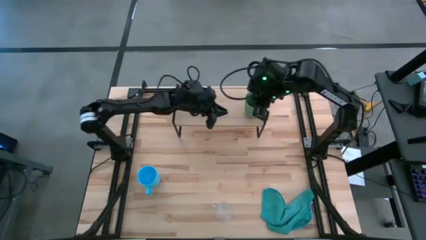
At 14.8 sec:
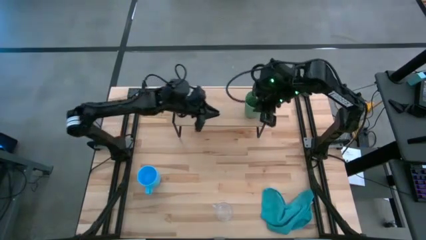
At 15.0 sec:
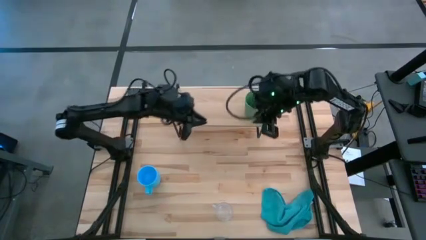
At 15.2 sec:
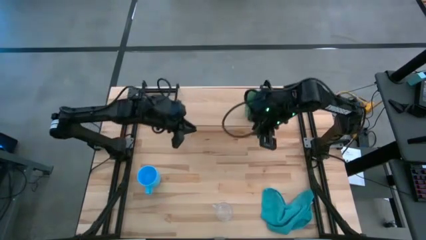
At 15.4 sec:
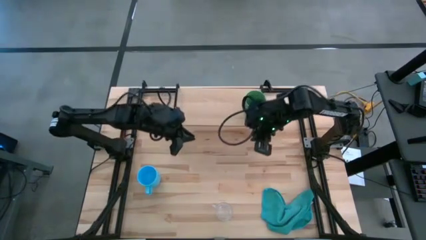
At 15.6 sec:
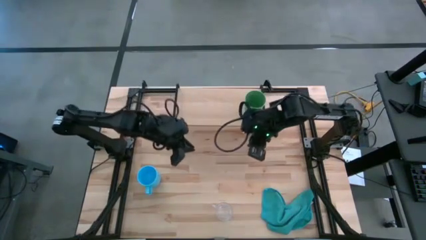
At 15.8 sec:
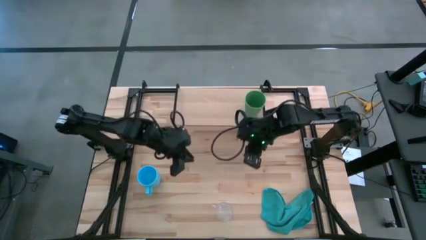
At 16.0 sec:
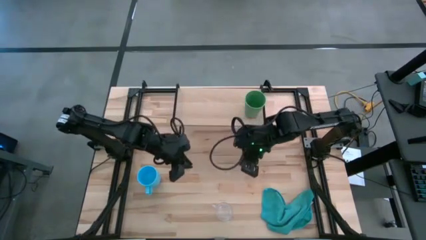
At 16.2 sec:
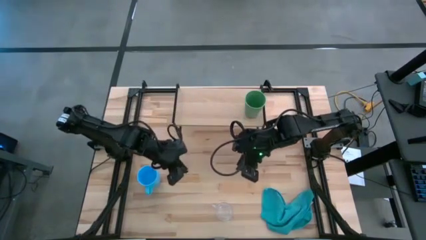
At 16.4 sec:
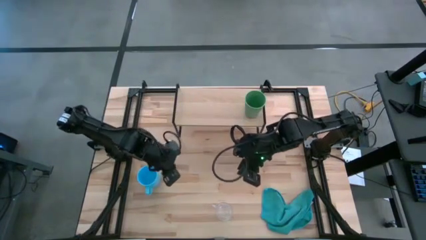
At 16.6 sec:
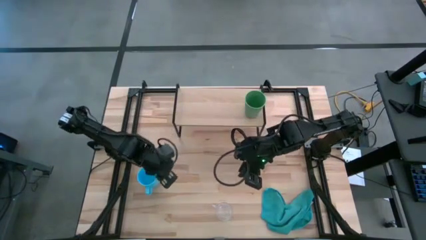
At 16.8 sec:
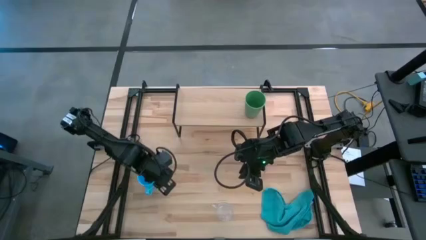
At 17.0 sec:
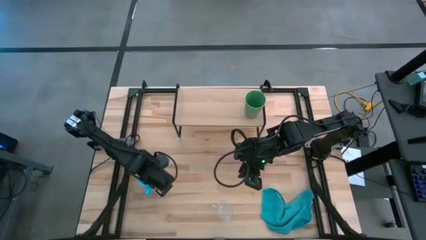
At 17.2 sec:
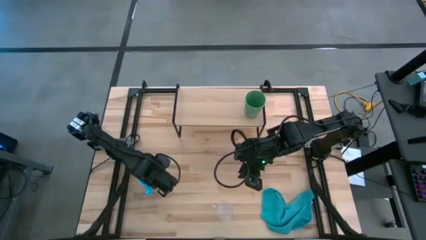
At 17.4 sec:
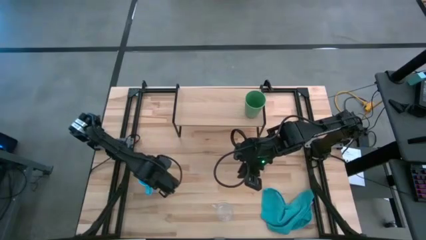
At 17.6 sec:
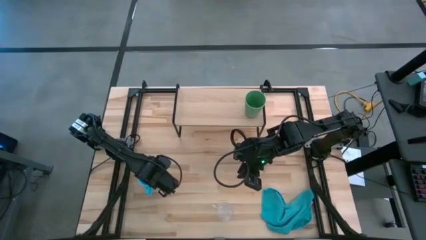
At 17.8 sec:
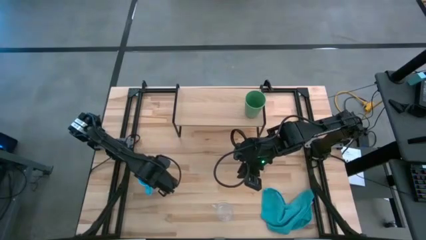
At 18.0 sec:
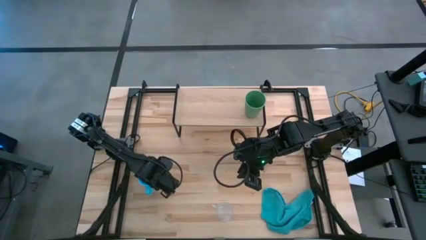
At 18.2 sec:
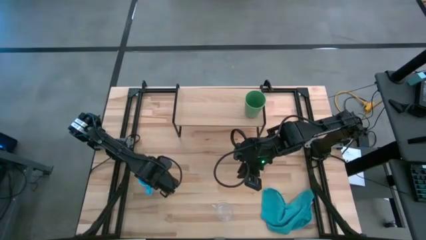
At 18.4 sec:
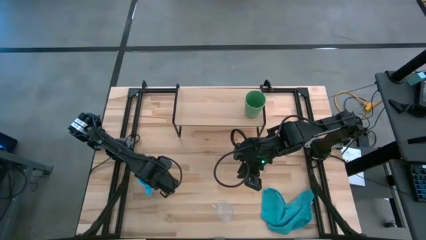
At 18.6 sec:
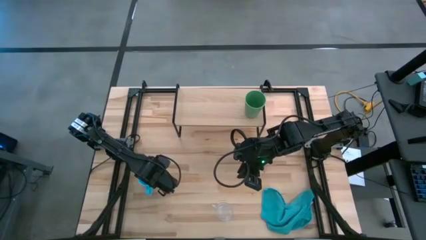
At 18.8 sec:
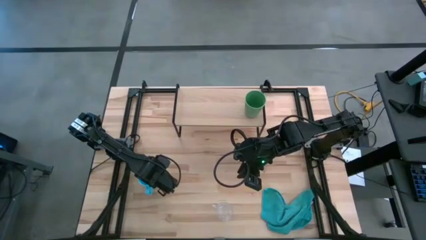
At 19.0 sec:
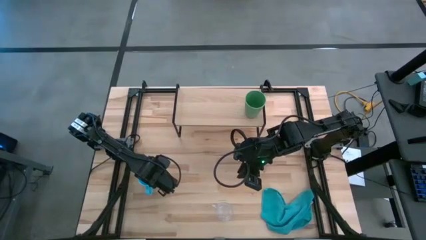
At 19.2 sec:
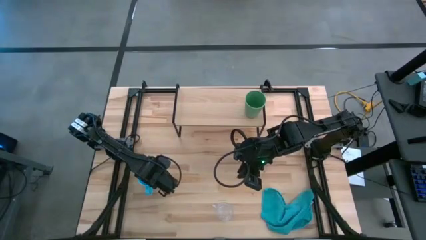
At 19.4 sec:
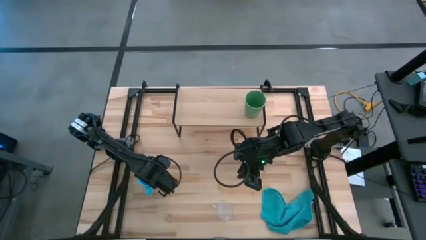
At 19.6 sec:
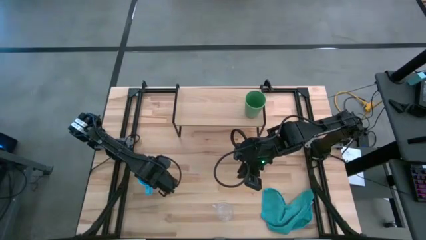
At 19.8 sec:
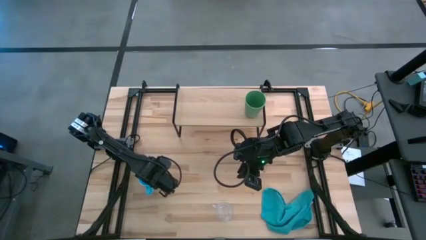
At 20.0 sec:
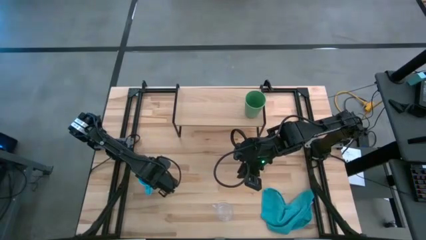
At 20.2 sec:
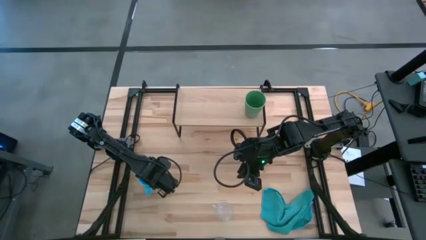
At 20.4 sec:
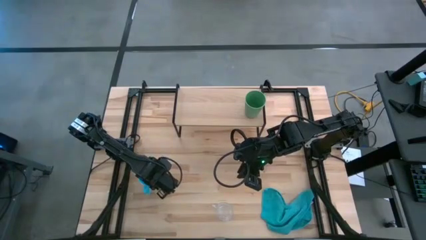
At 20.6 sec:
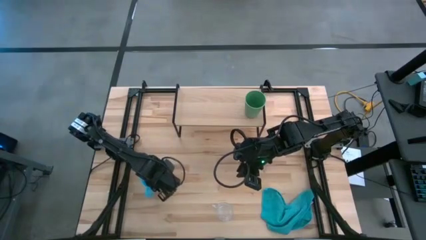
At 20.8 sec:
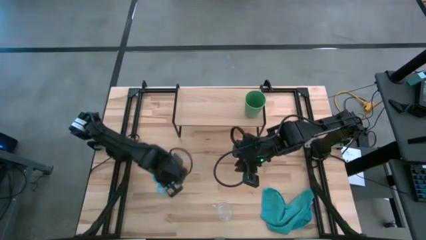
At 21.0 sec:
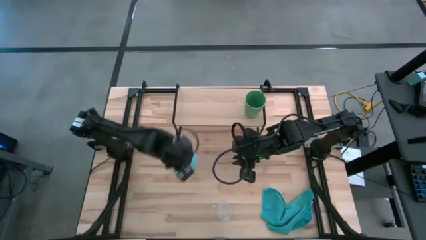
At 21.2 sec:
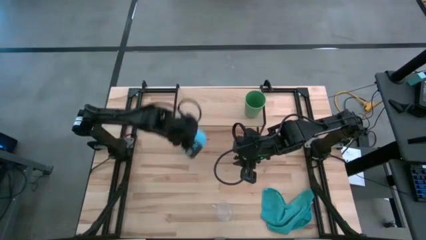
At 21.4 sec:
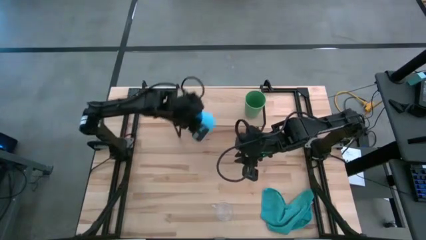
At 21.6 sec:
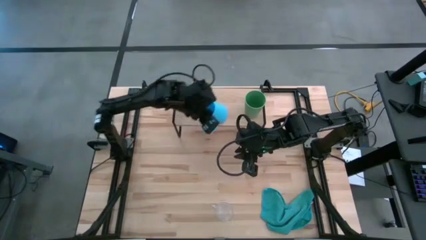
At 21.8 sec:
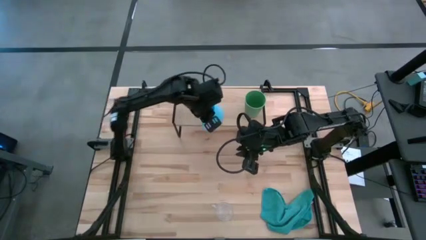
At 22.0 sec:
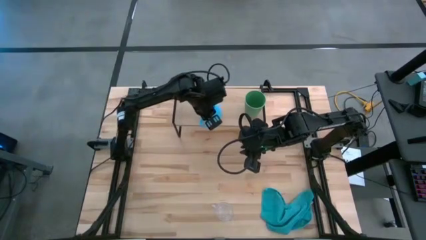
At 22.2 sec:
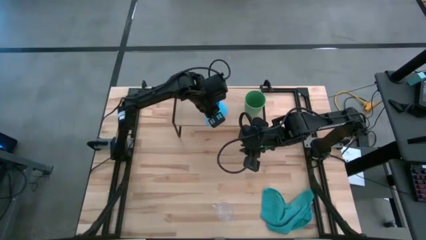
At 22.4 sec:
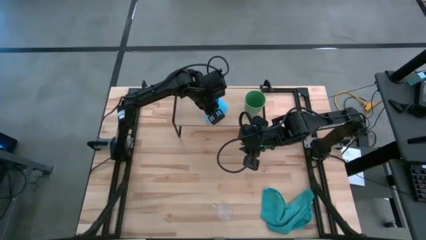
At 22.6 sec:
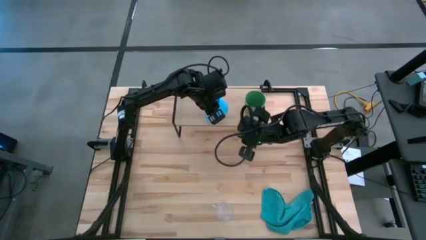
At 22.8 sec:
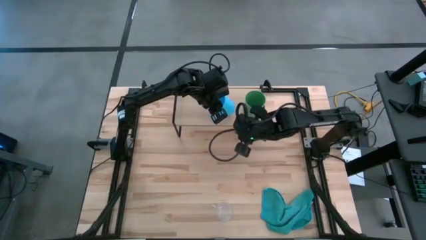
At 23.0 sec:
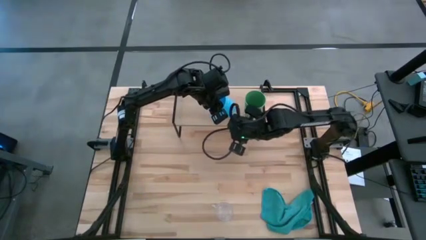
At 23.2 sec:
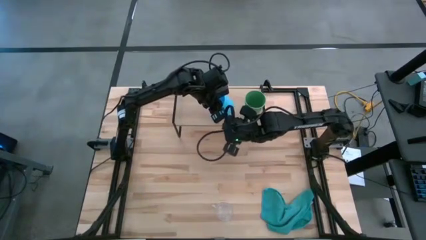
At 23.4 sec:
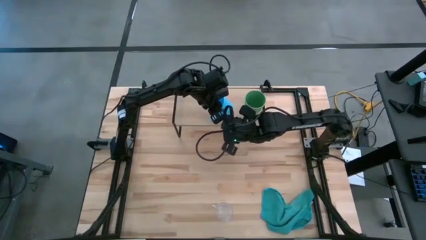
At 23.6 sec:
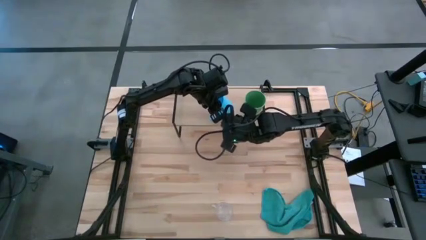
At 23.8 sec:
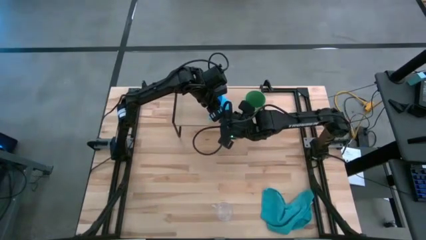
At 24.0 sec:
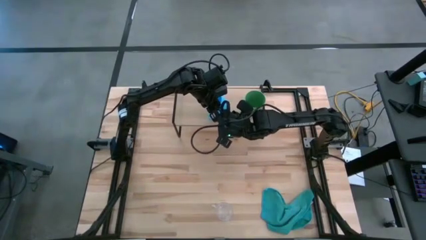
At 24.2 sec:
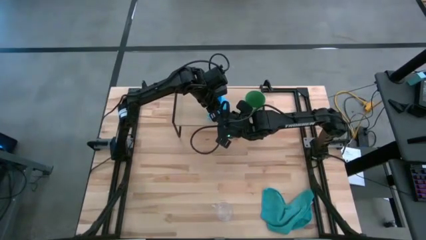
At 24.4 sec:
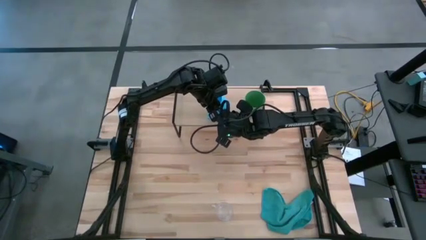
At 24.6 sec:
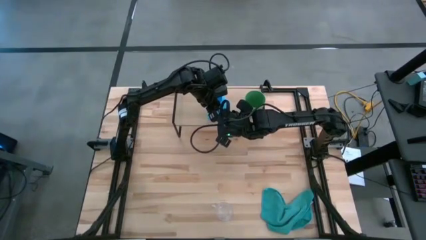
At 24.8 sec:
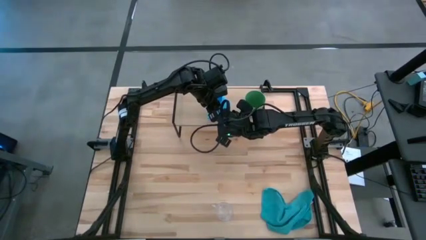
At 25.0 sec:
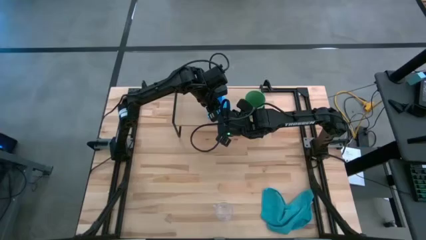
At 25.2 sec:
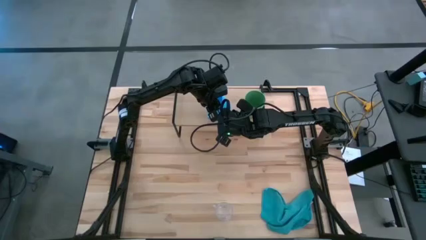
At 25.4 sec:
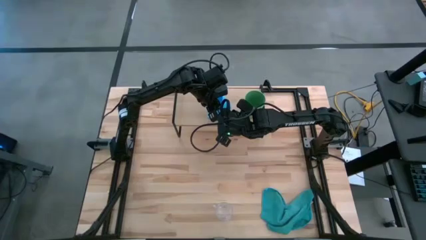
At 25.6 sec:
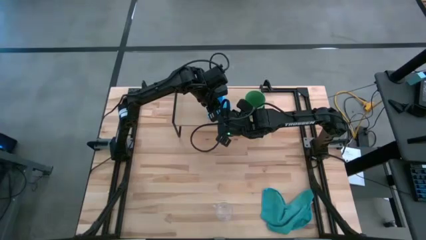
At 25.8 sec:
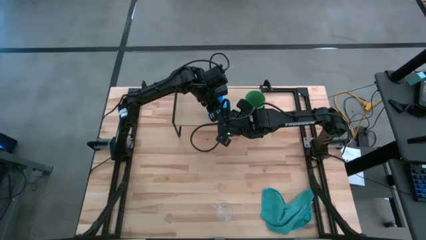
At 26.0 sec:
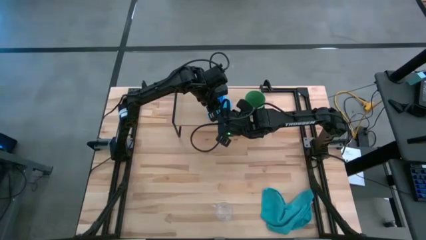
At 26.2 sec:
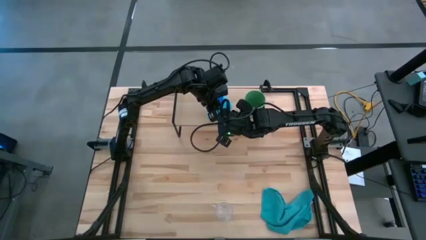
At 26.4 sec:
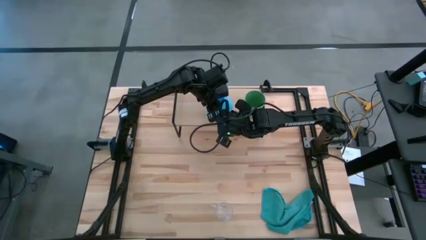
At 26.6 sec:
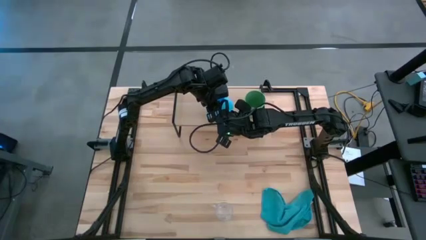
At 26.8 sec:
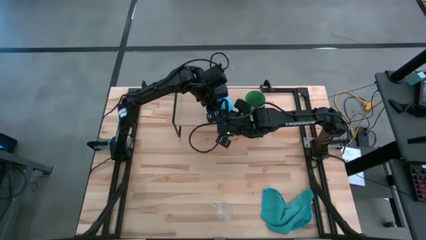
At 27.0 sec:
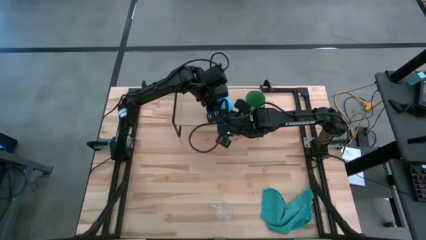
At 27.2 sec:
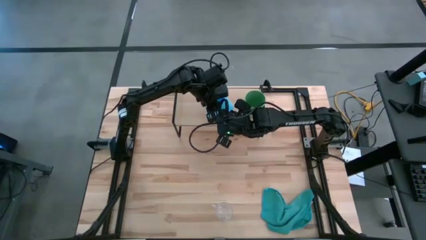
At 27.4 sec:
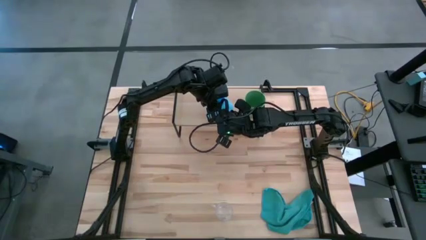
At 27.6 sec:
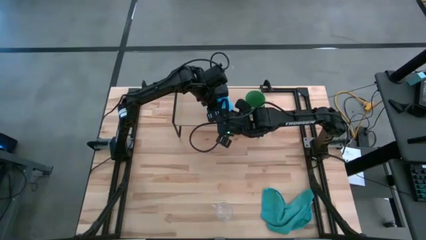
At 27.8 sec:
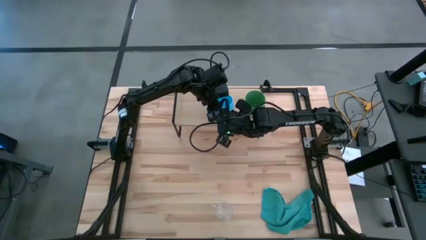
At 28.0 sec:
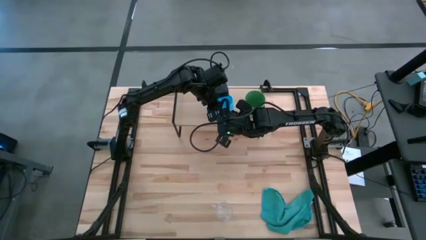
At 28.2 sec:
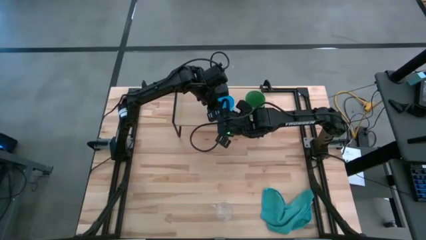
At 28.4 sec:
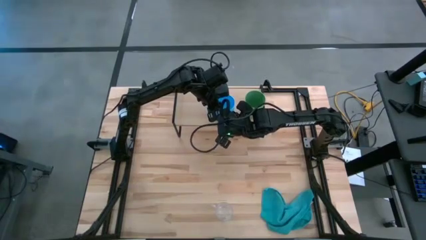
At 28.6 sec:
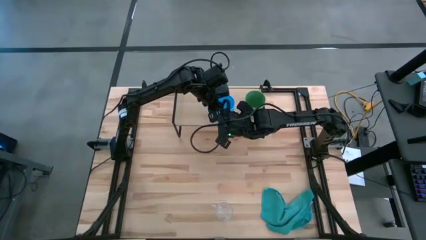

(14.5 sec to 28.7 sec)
Task: Stack small to large cups/mugs on shelf
Put the blue mug on the shelf
